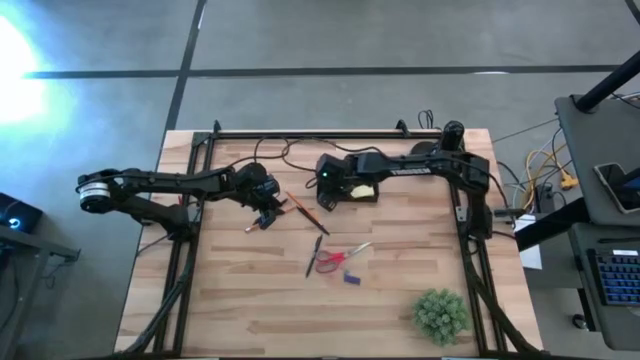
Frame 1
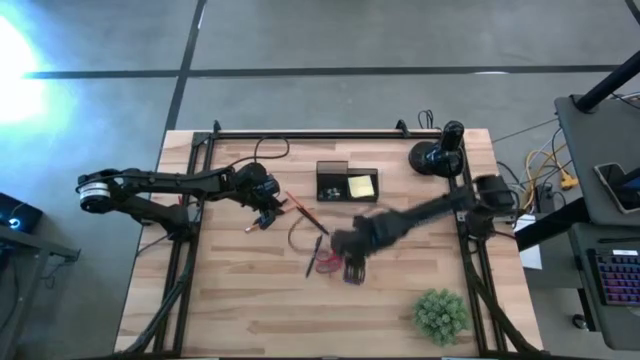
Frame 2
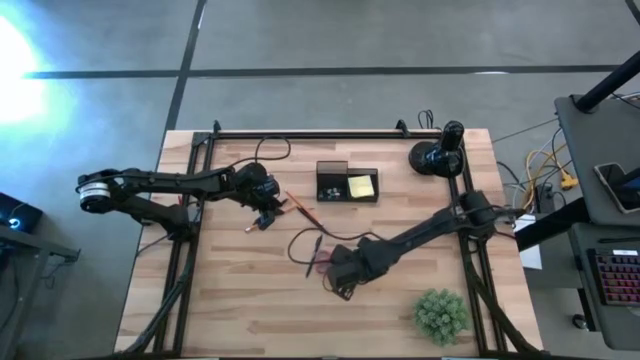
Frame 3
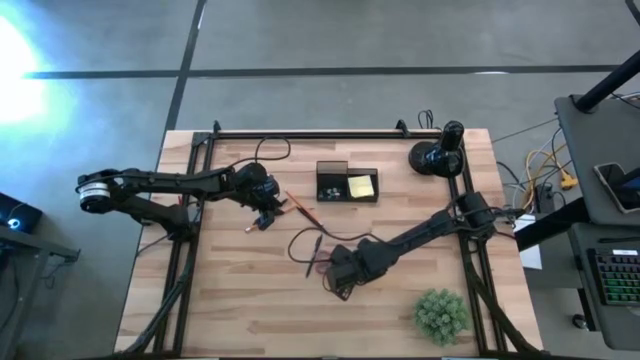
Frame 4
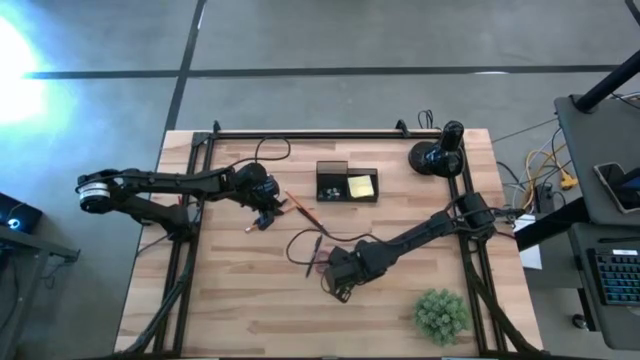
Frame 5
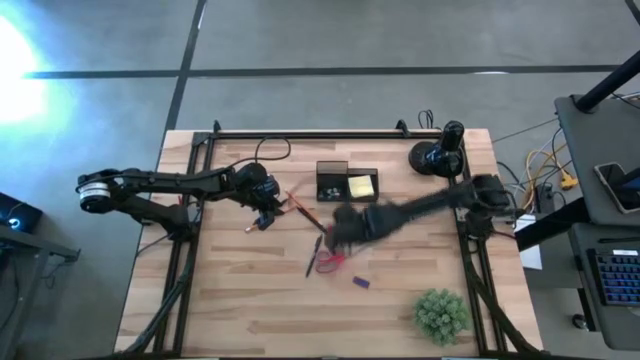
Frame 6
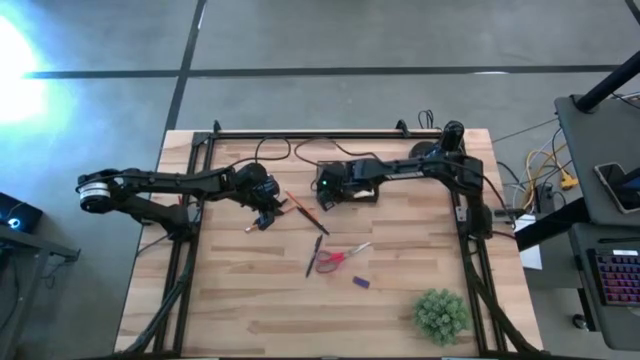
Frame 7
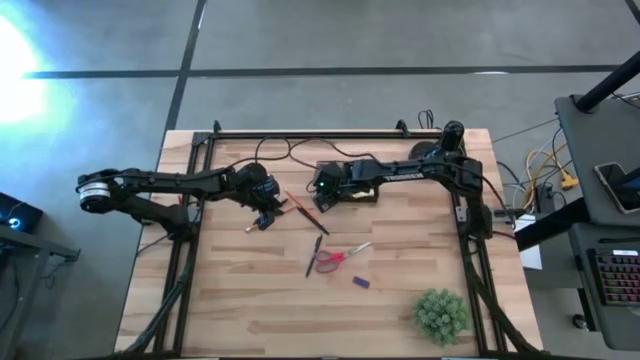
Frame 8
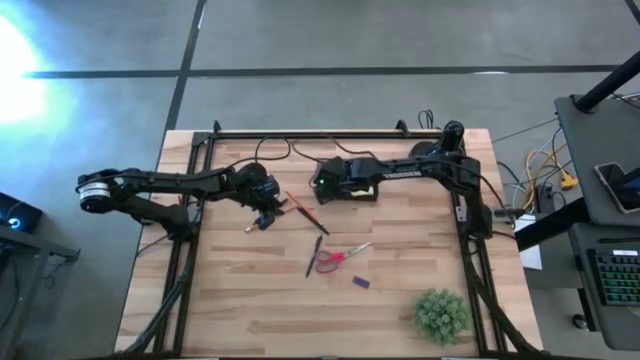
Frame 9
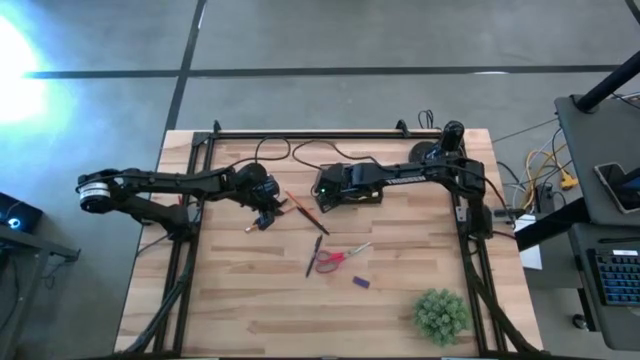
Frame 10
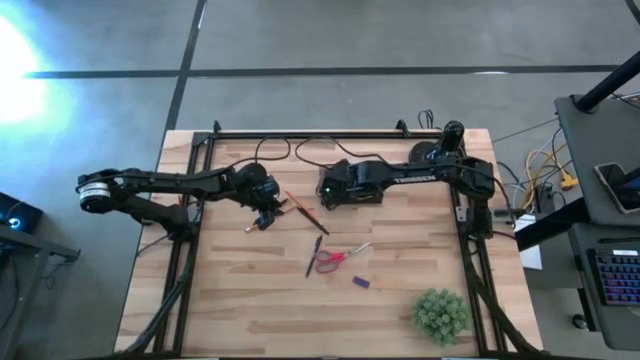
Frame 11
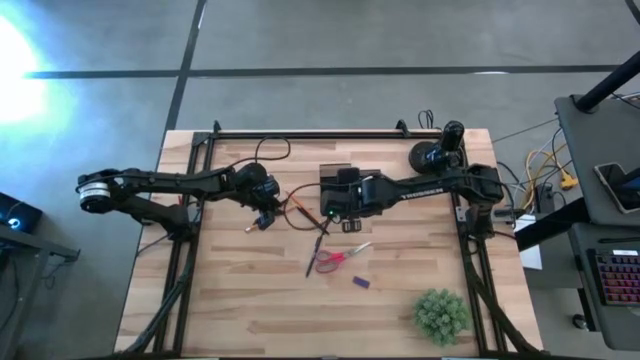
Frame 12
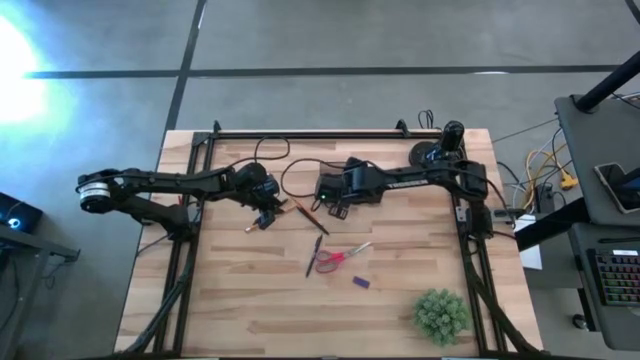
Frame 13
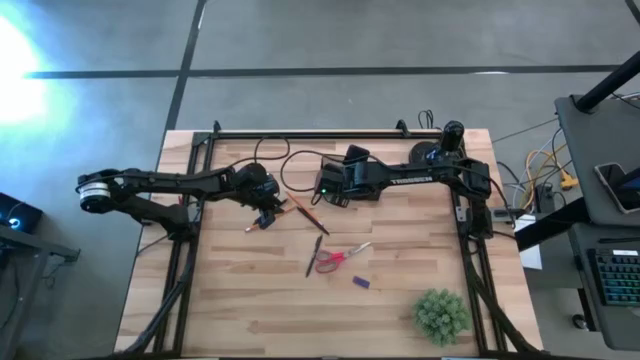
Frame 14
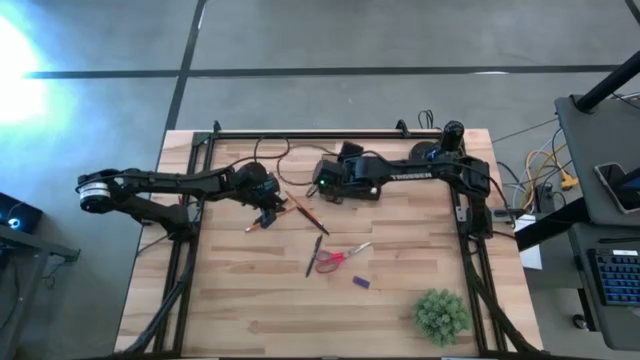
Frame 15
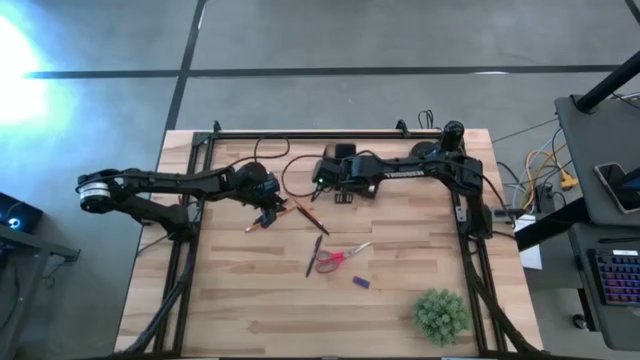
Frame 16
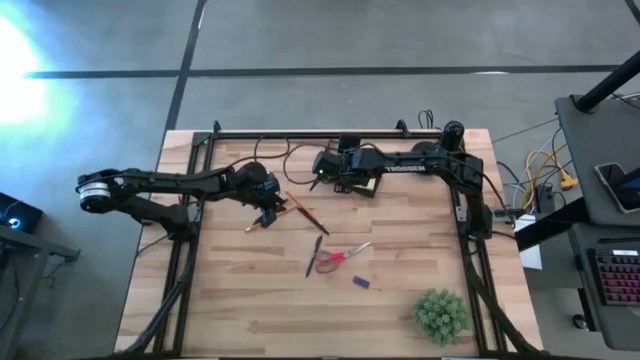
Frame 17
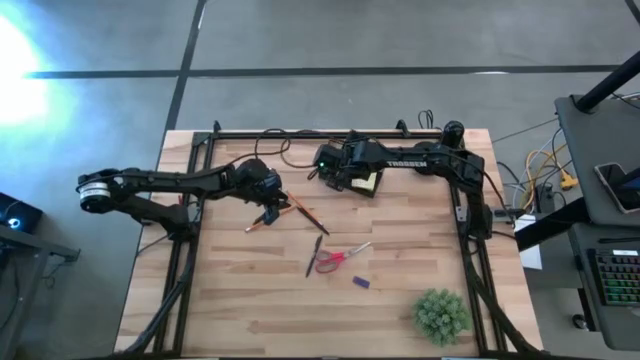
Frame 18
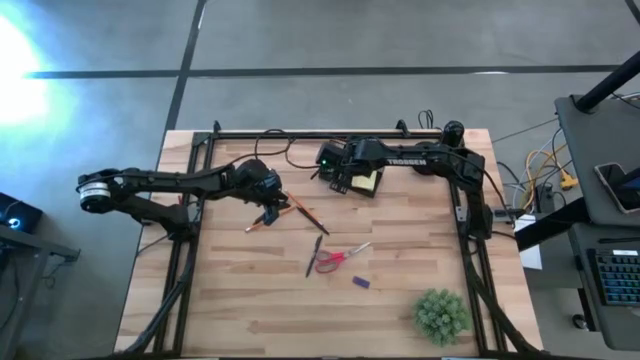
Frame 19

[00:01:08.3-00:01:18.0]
Task: Pick and place office supplies into organizer
Put the blue binder clip into the desk organizer

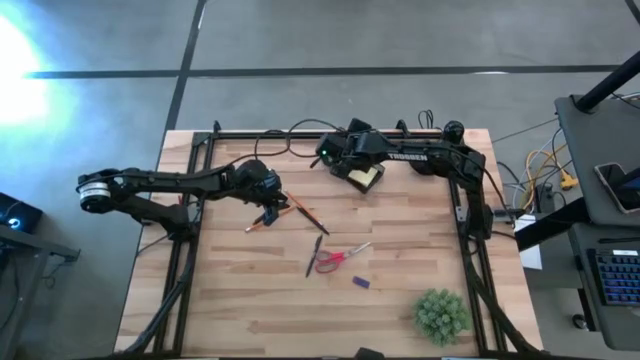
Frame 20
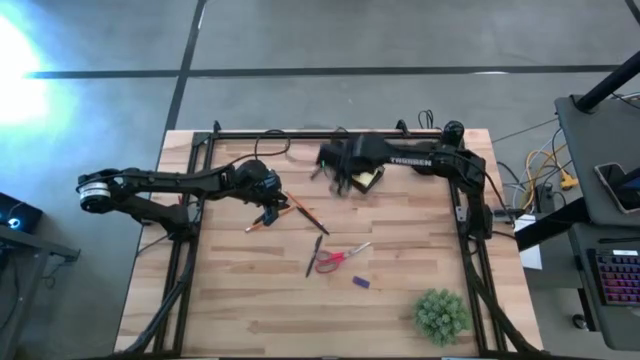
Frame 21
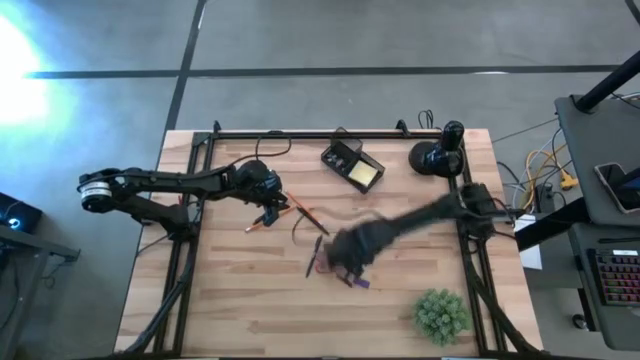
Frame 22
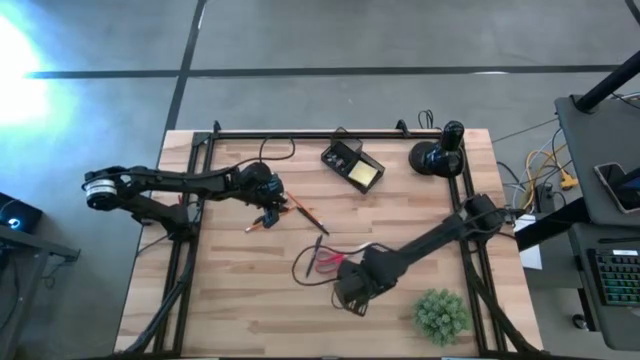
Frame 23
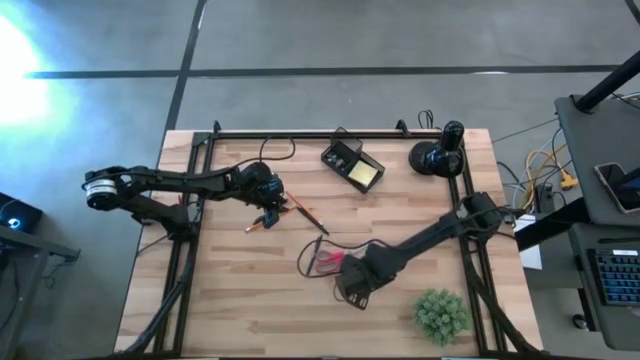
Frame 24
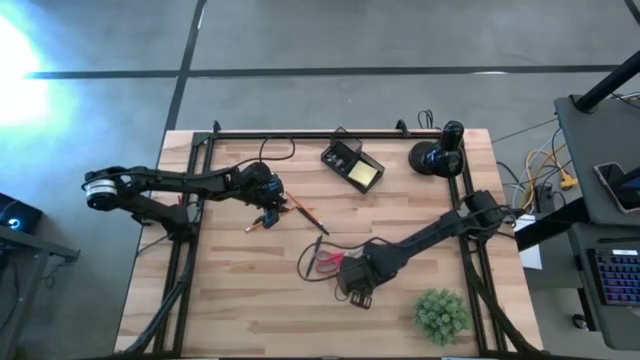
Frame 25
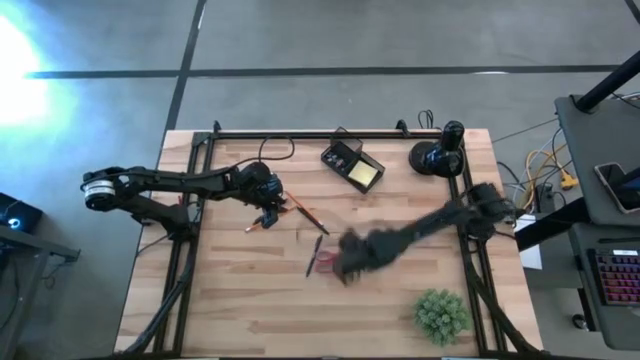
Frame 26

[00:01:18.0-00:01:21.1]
Put the blue eraser into the desk organizer

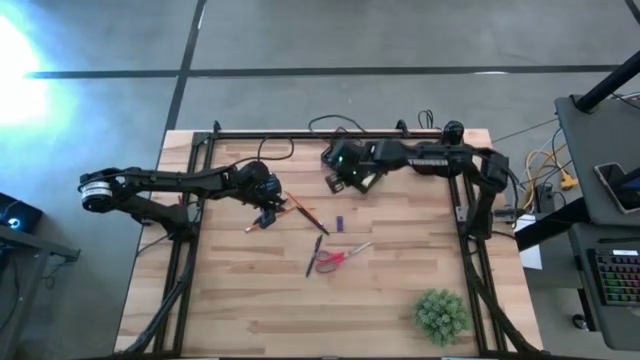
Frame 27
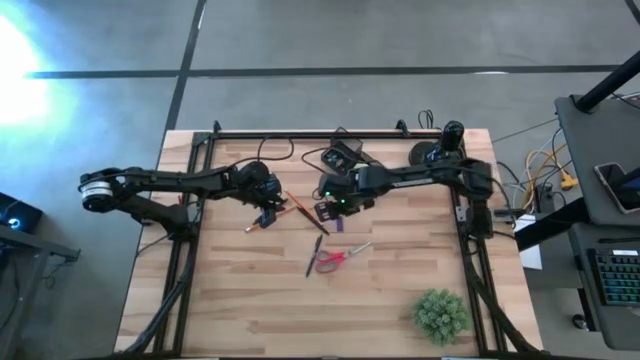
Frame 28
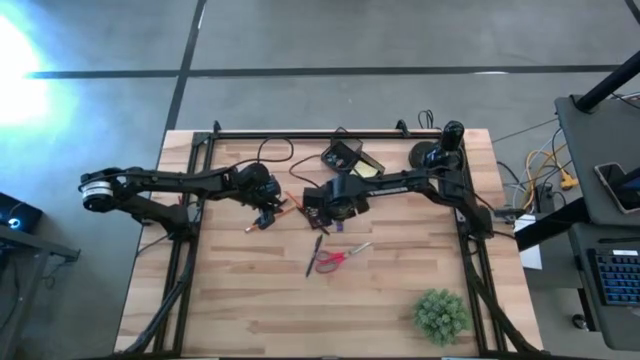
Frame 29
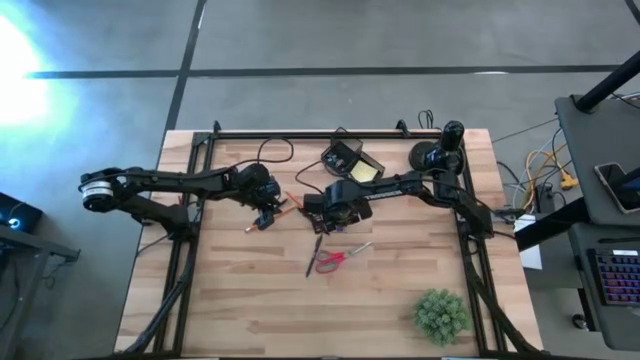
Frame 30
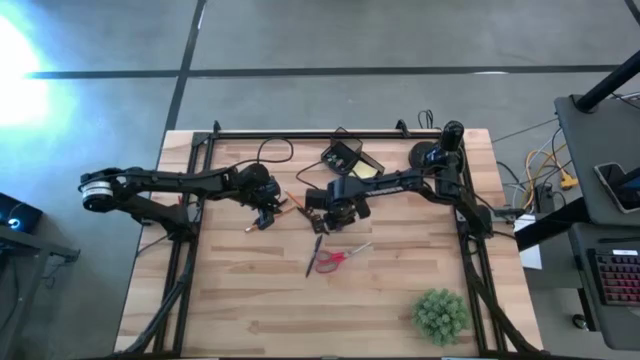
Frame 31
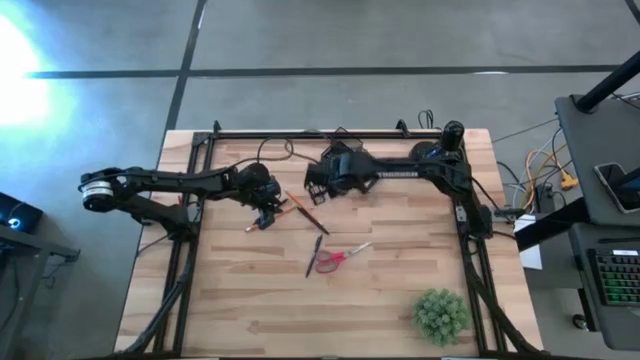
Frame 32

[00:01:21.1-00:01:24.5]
Put the blue eraser into the desk organizer

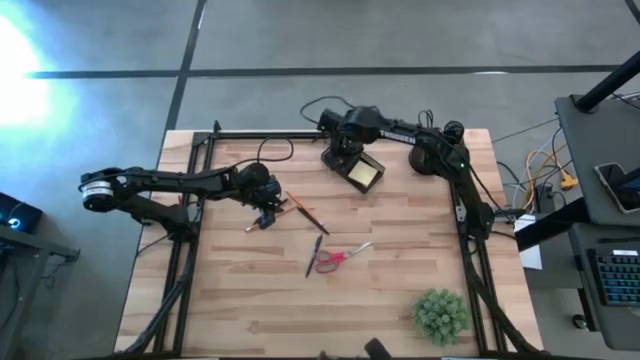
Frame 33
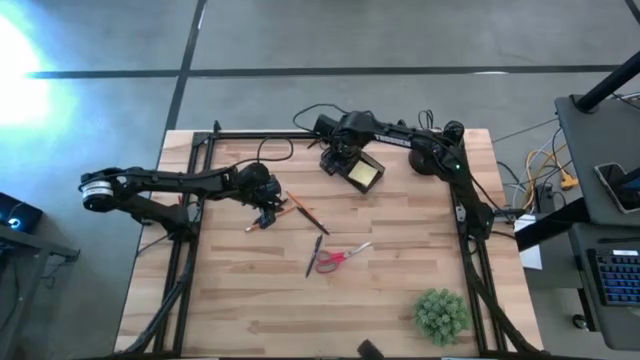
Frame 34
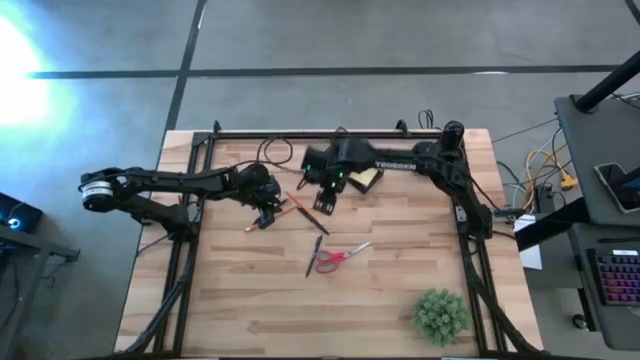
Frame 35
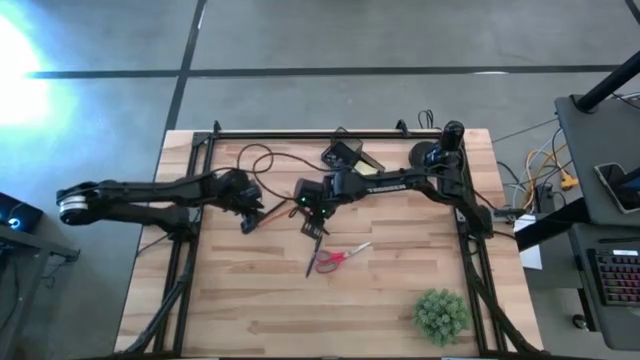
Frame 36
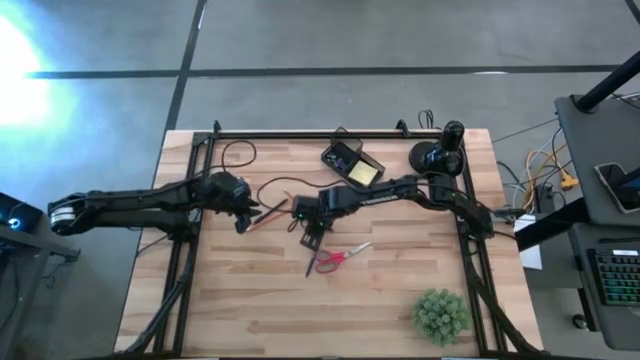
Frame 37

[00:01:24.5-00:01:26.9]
Put the top right pen into the desk organizer

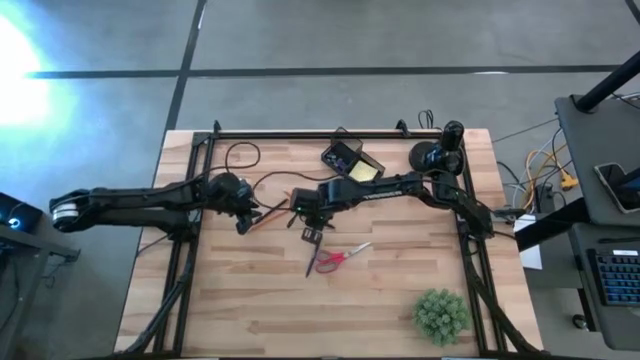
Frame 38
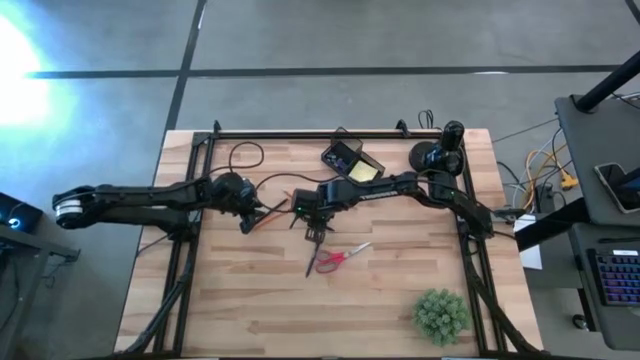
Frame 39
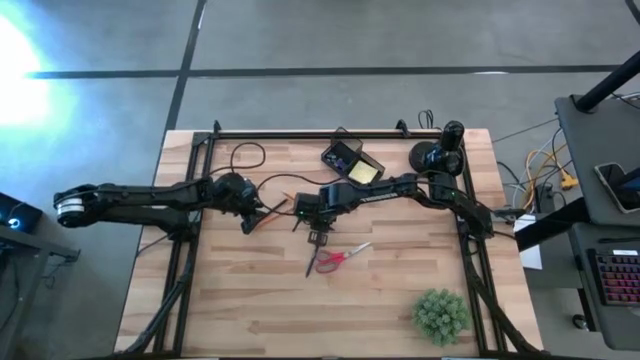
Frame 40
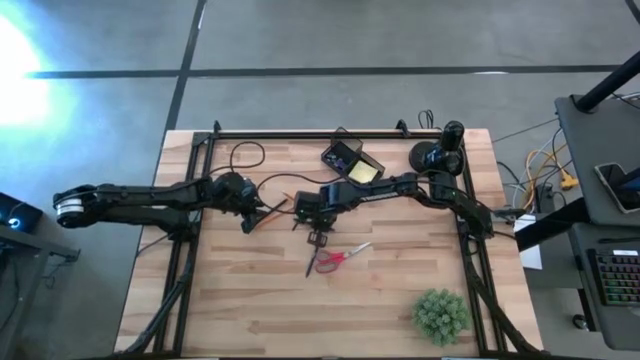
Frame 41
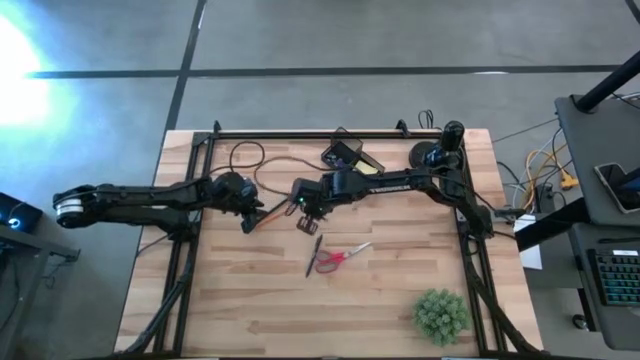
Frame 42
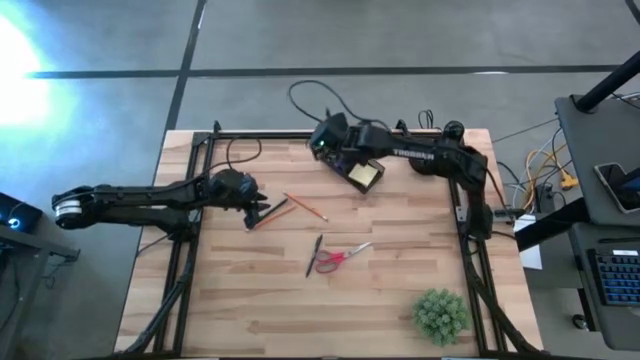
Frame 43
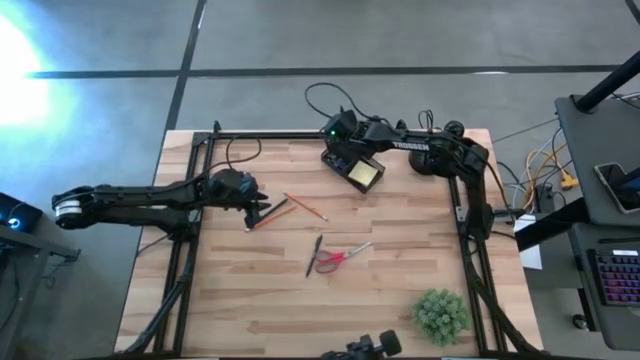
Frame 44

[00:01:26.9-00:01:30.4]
Put the top right pen into the desk organizer
